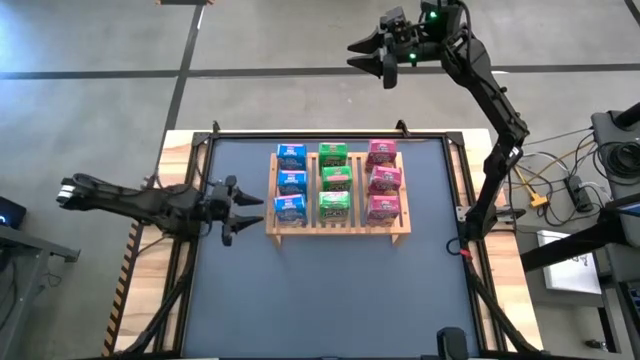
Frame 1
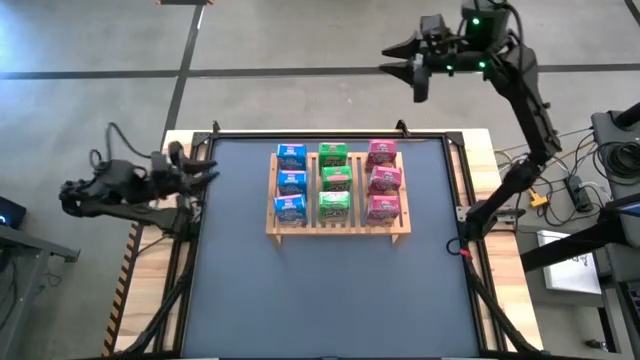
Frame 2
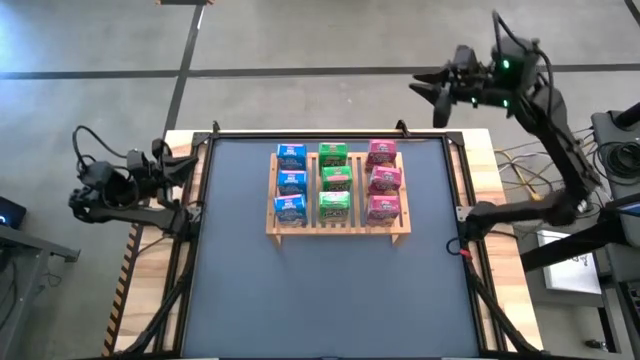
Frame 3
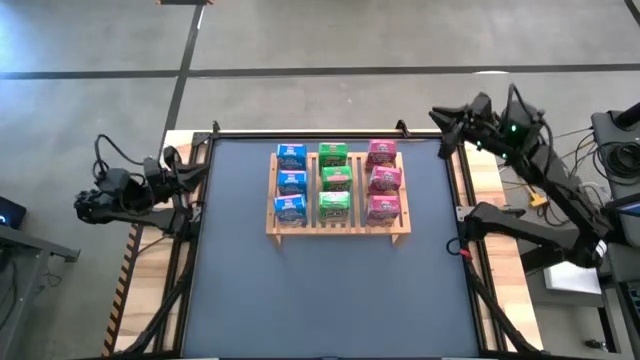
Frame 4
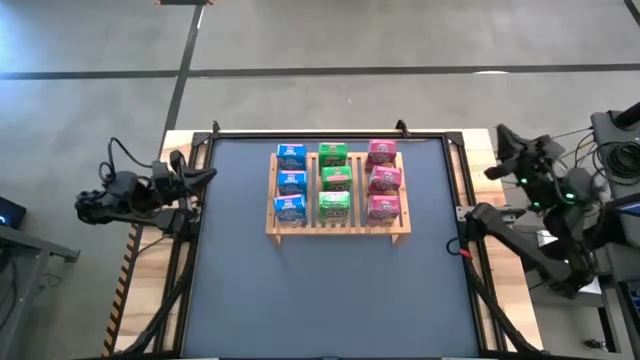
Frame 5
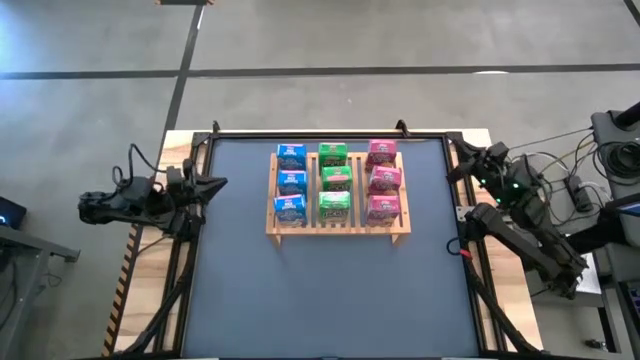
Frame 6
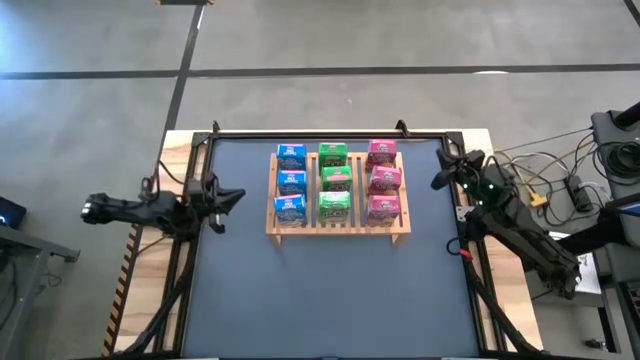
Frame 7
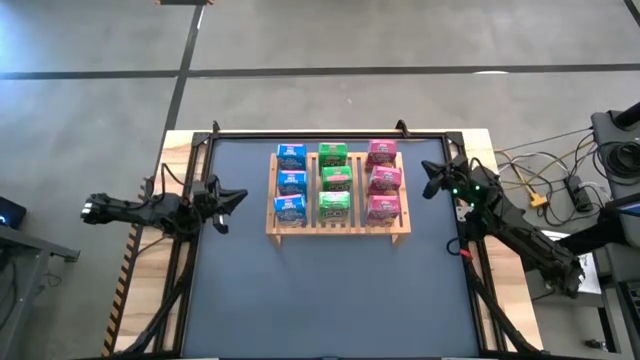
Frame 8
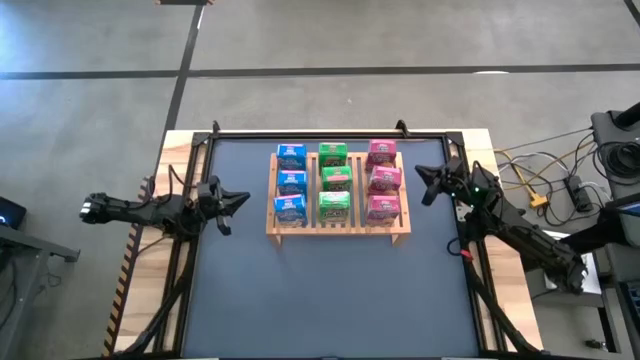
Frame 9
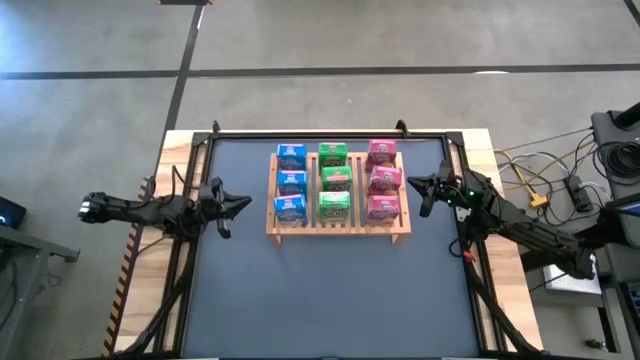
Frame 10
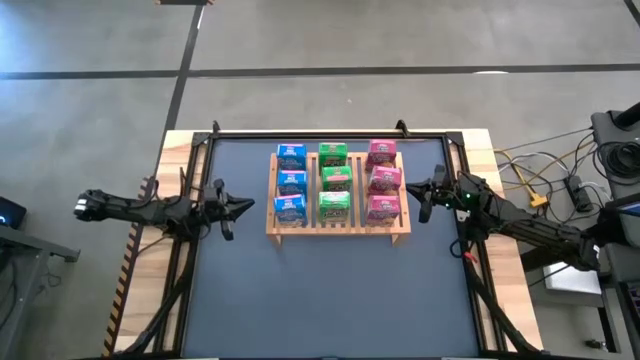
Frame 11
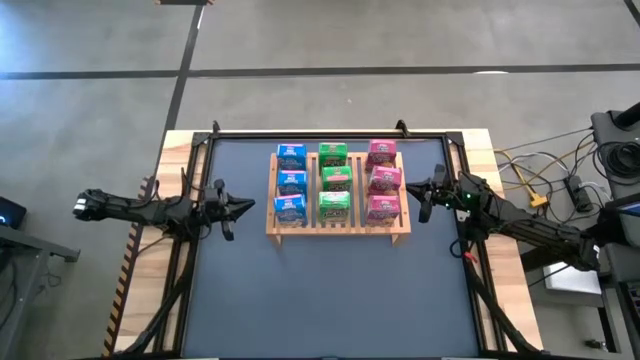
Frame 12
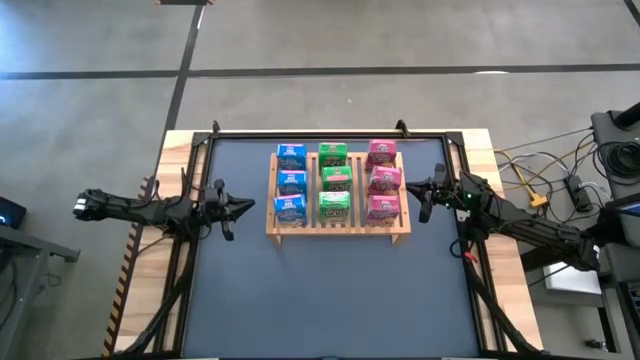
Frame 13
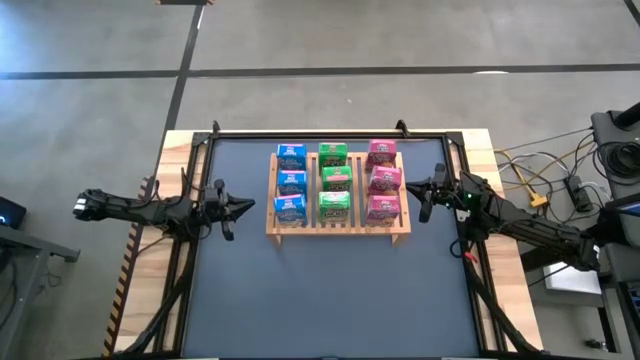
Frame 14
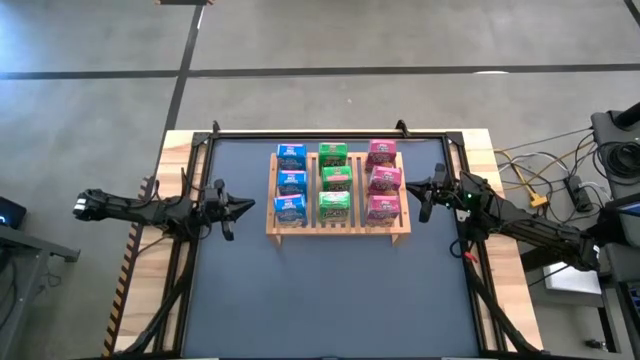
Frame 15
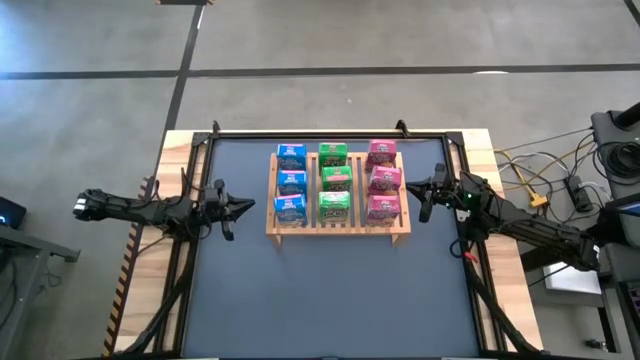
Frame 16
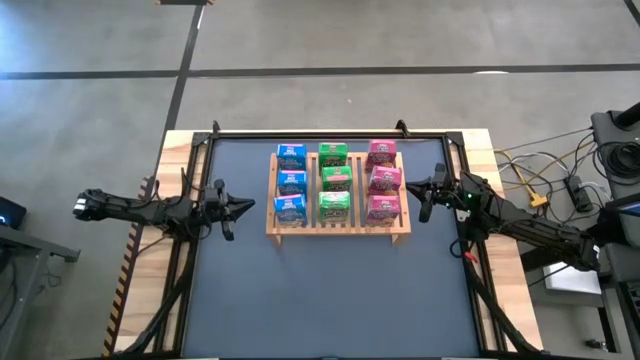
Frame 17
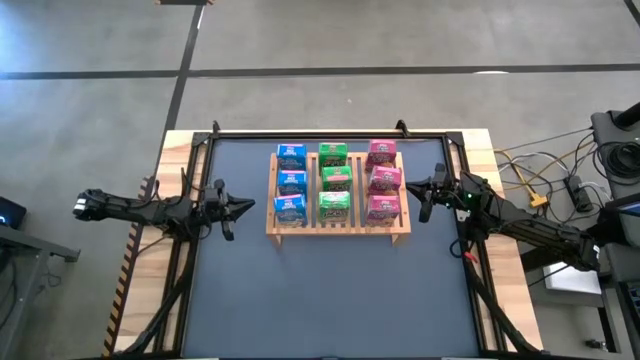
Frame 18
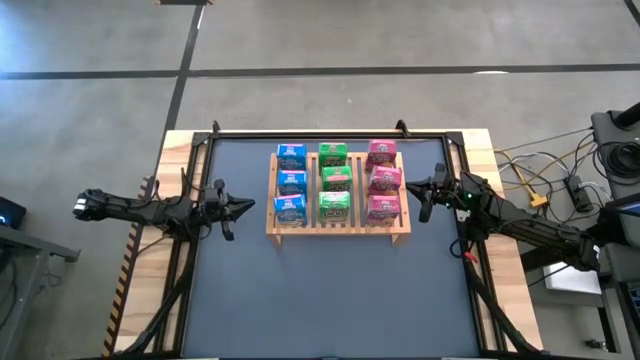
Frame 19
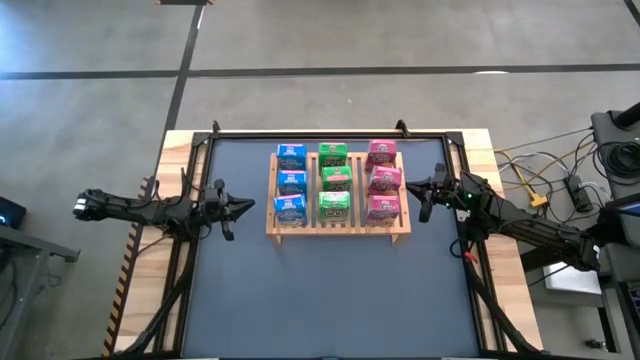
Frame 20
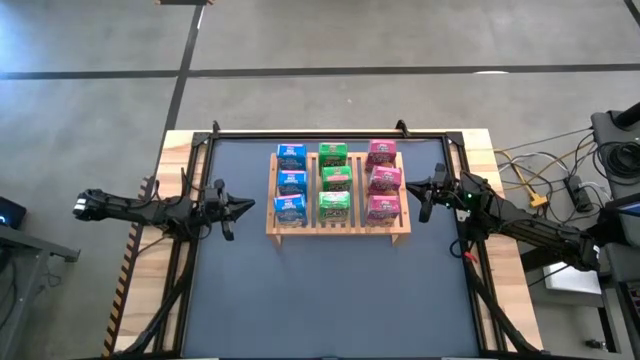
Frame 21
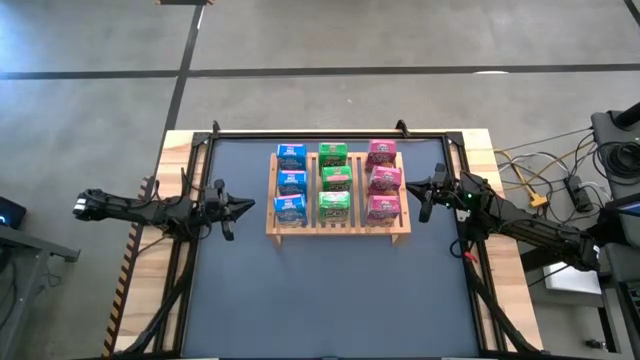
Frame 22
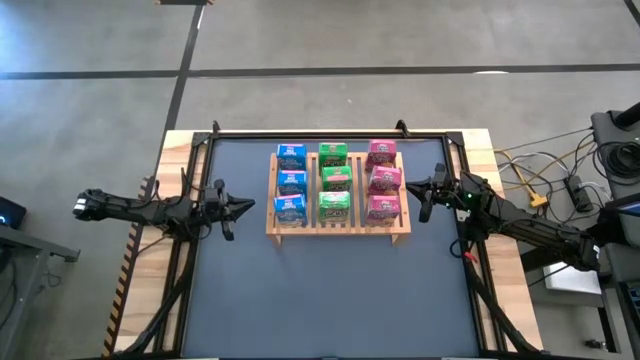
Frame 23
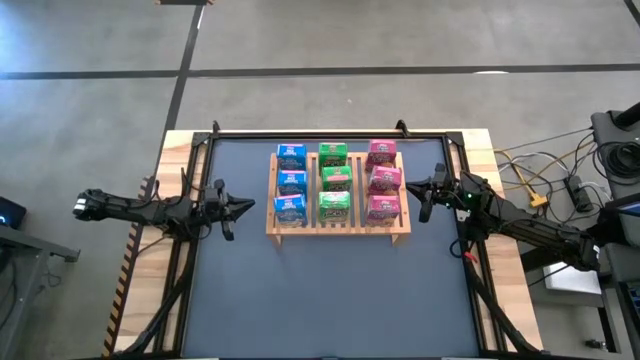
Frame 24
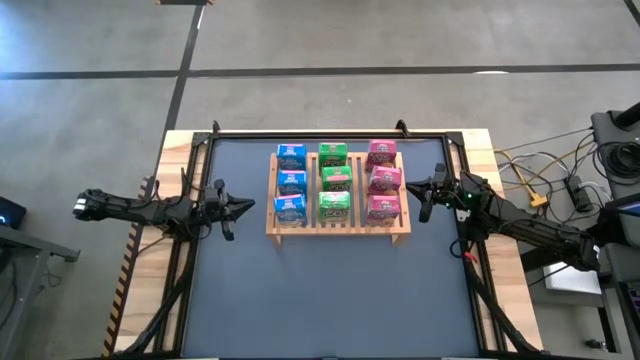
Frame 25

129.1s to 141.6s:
Task: Stack cereal on shelf
Return to Home Position

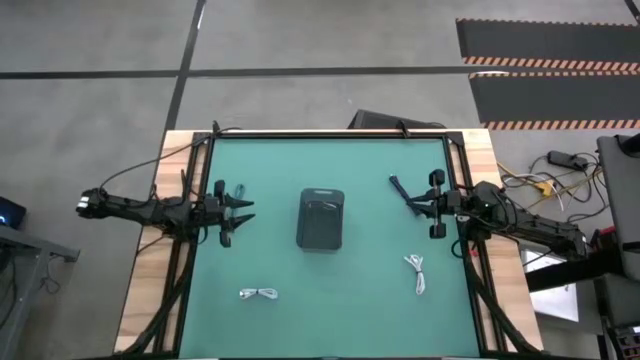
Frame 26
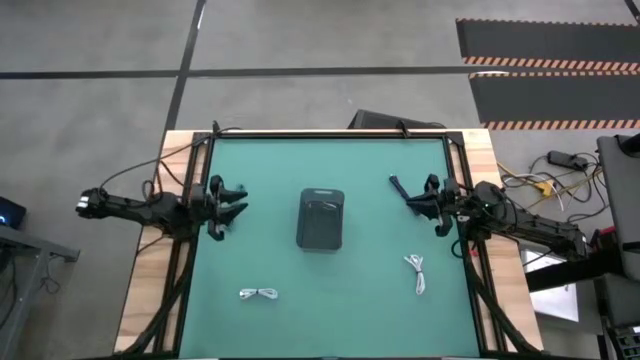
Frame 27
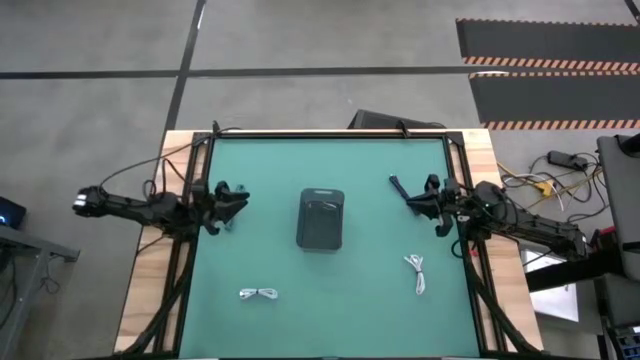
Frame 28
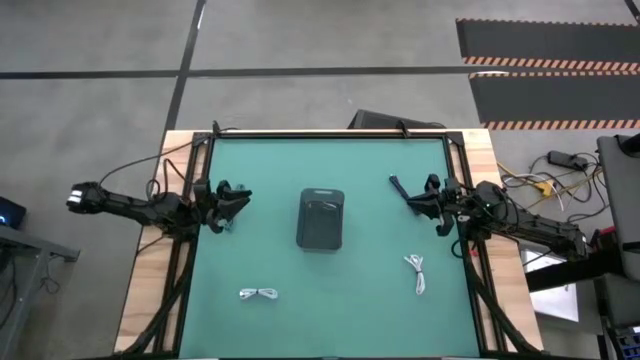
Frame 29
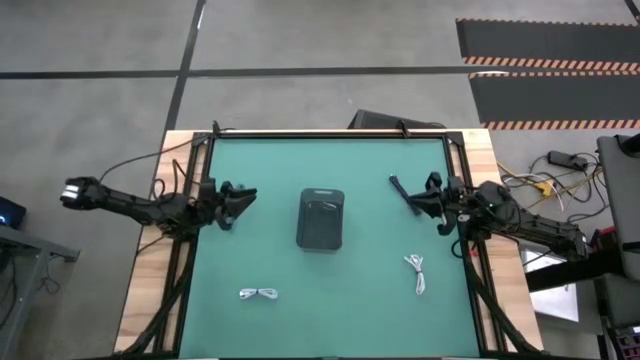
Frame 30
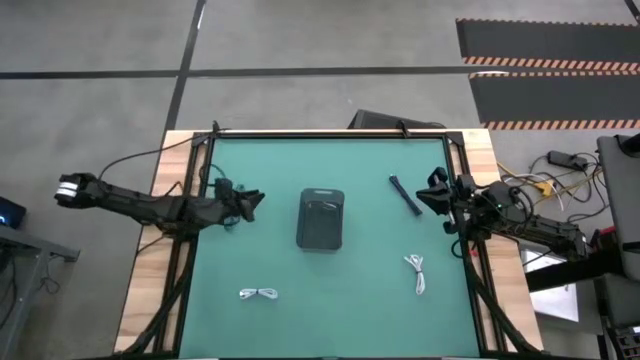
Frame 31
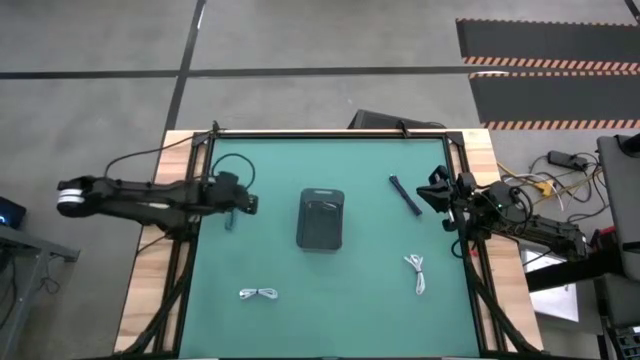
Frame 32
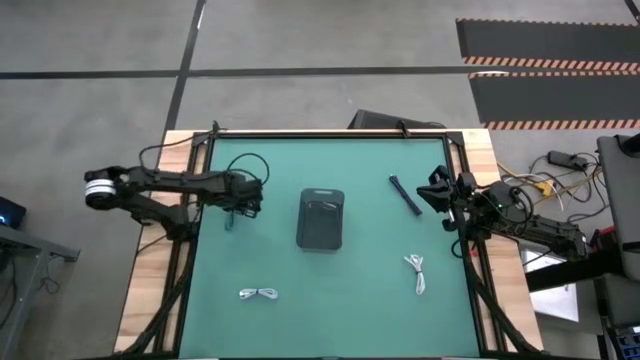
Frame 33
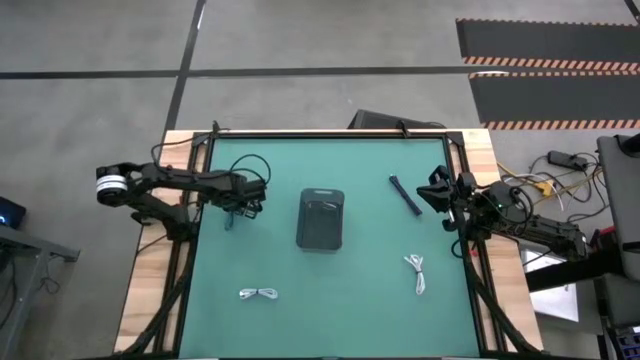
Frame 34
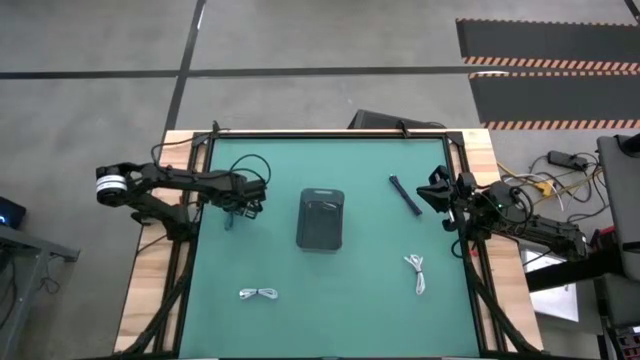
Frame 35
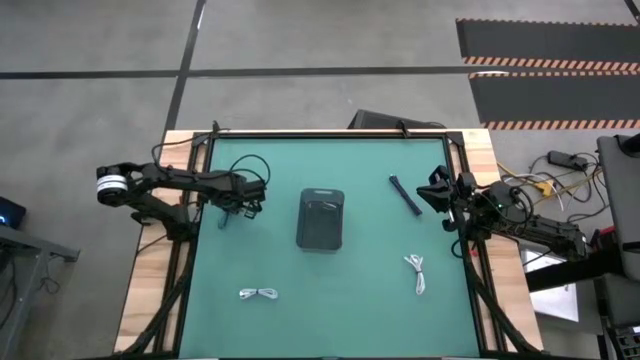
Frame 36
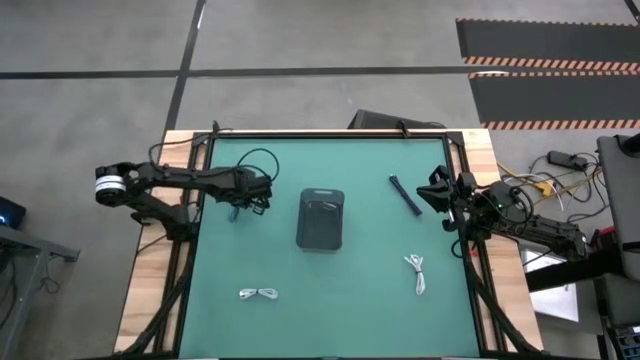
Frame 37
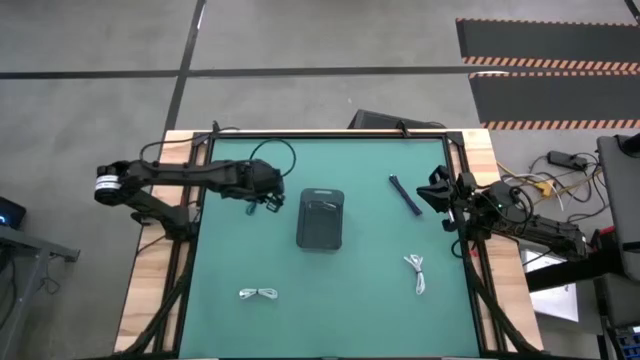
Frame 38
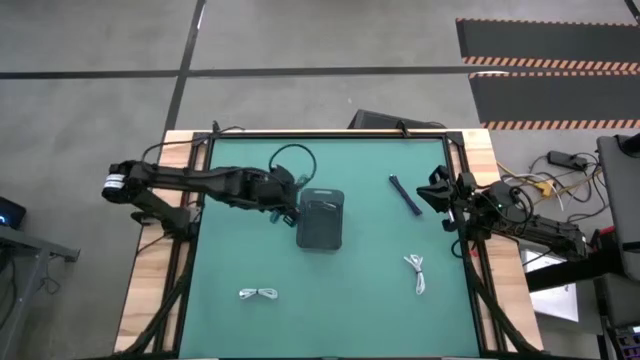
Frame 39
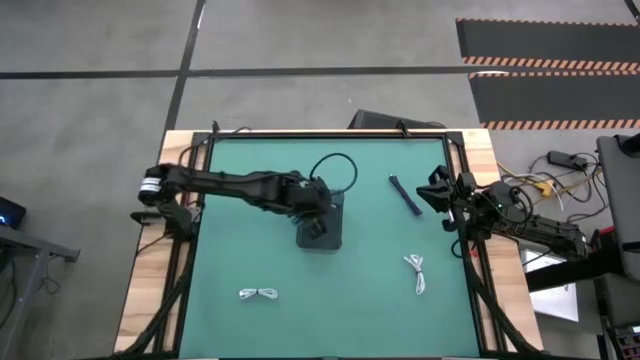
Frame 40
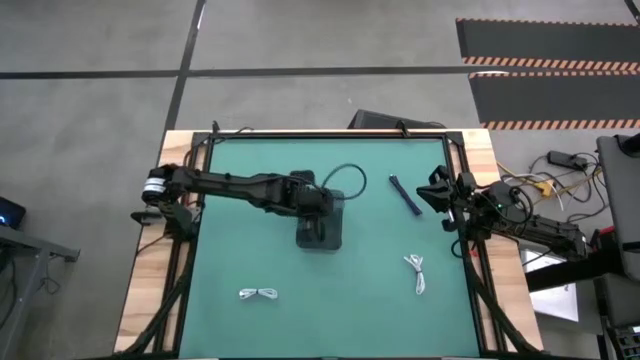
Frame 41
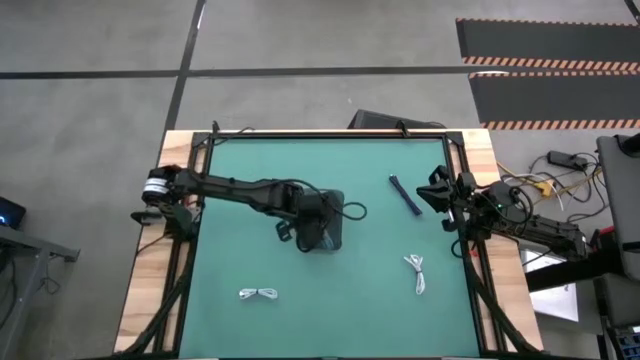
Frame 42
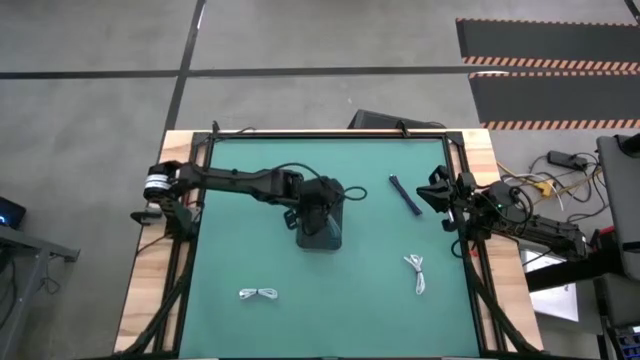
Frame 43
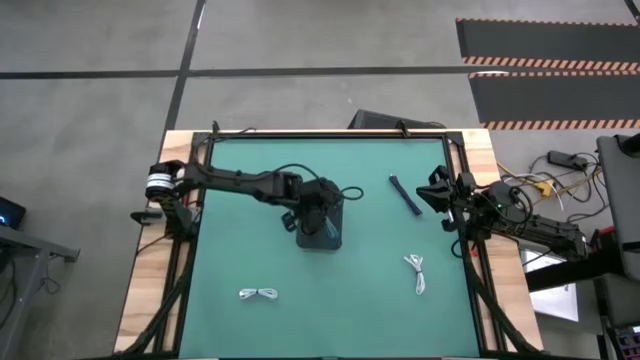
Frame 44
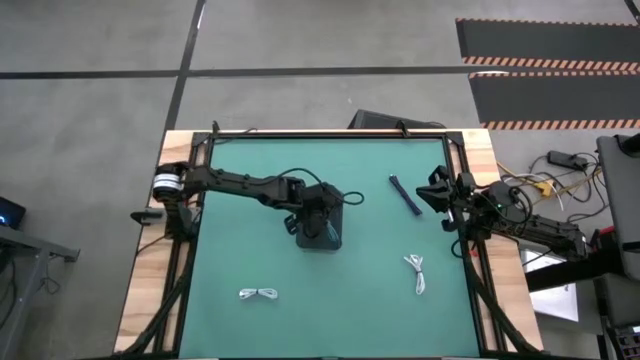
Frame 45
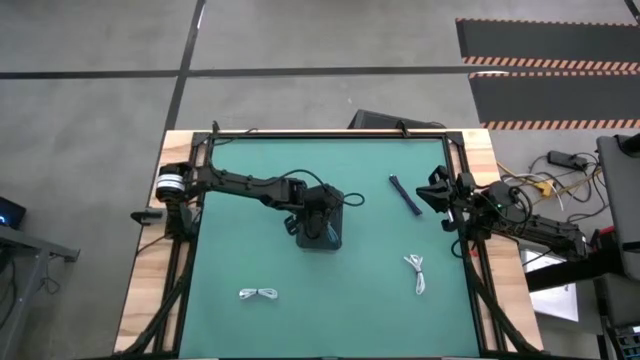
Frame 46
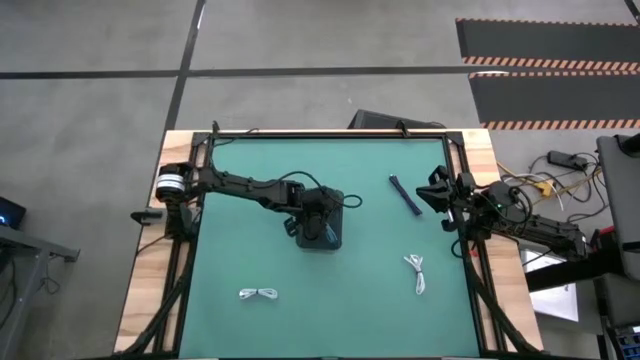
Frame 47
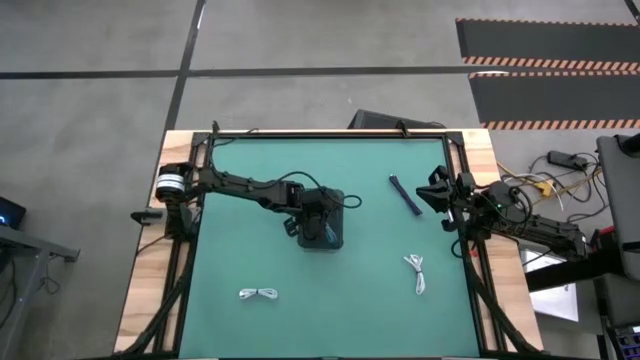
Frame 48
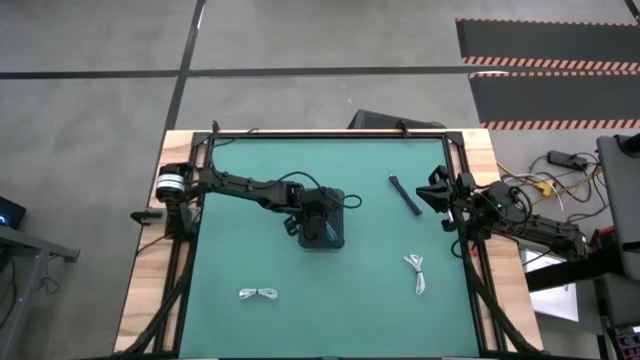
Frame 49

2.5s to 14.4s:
Task: Pick and place USB-C Cables
Put the black white charger cable into the black bin
